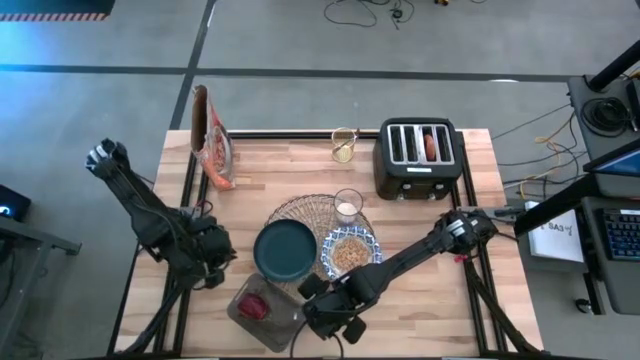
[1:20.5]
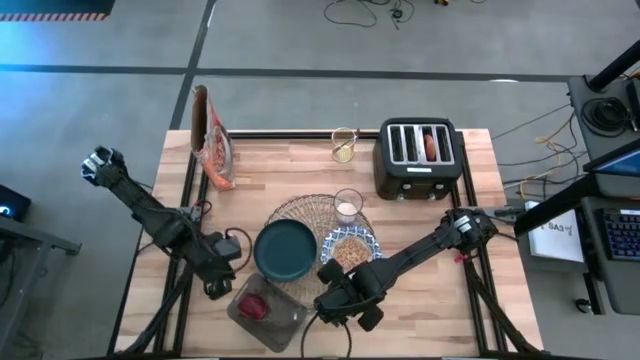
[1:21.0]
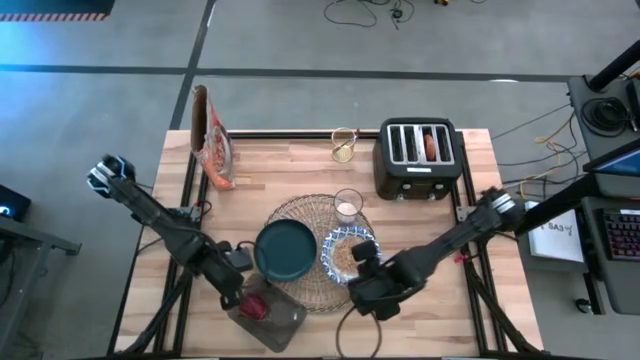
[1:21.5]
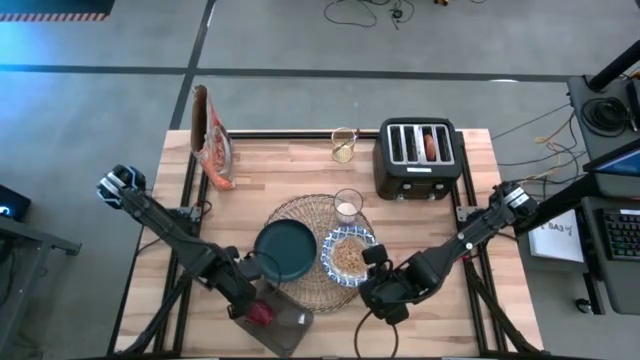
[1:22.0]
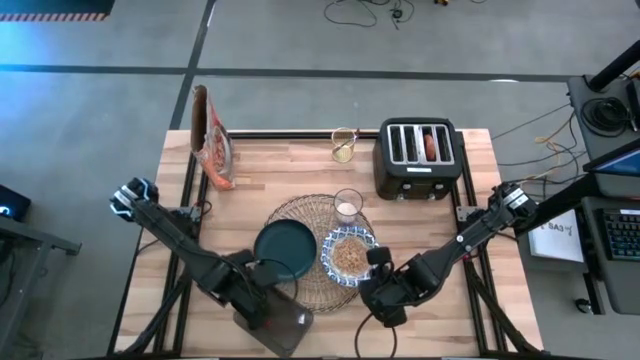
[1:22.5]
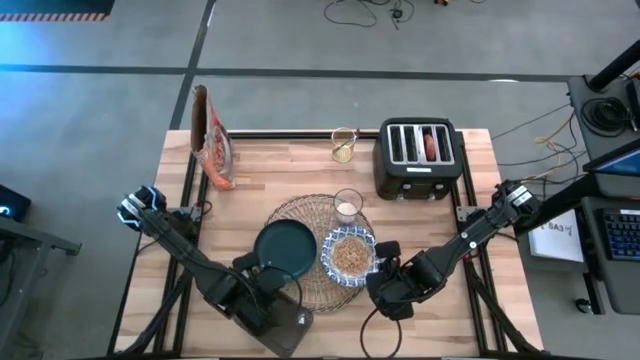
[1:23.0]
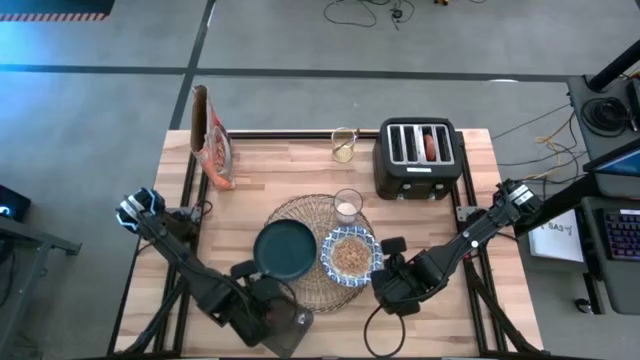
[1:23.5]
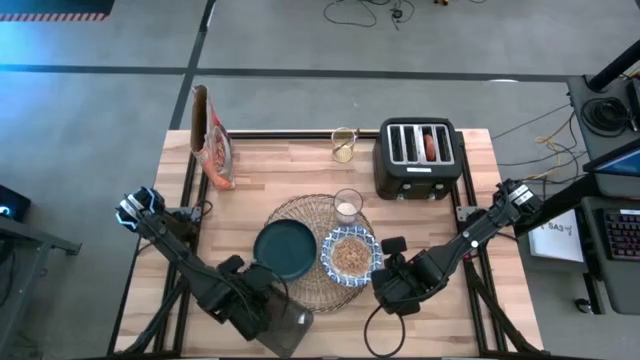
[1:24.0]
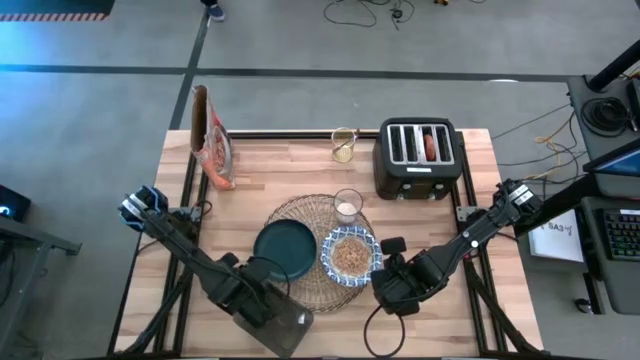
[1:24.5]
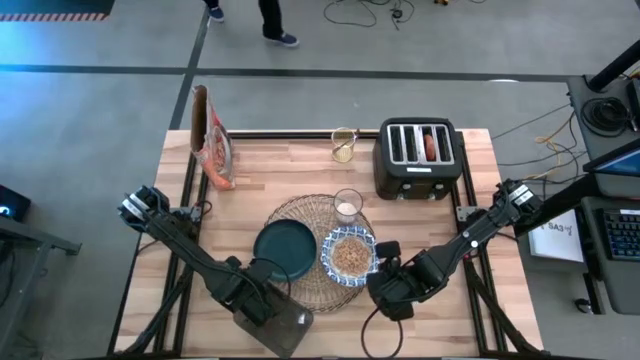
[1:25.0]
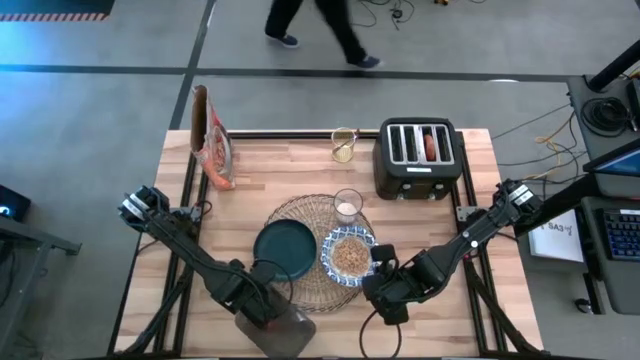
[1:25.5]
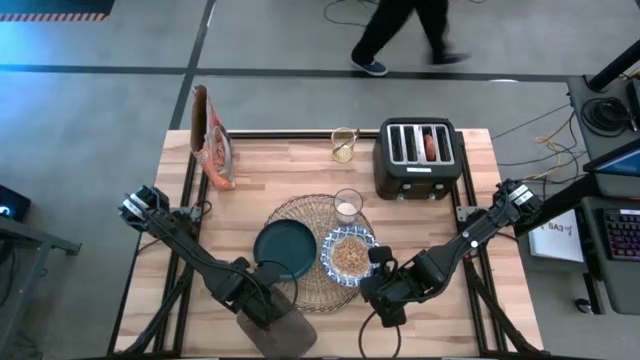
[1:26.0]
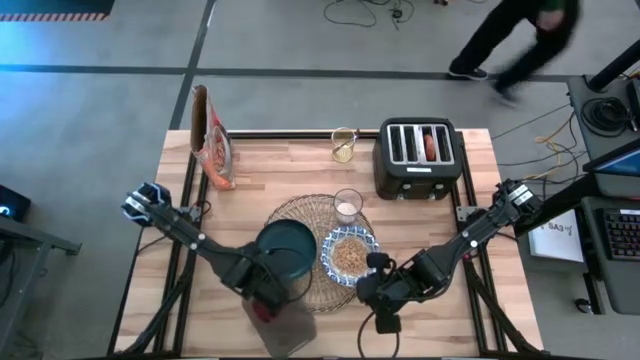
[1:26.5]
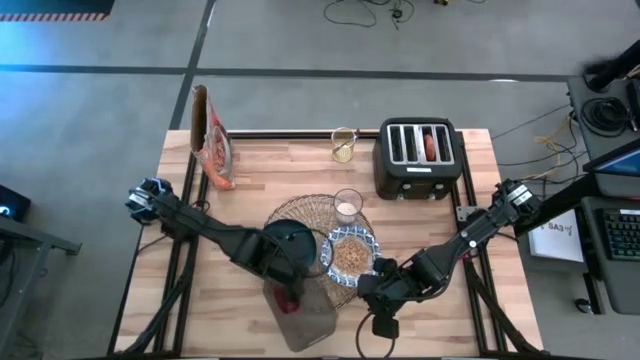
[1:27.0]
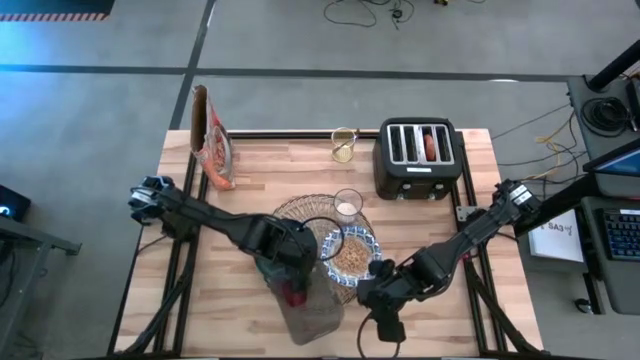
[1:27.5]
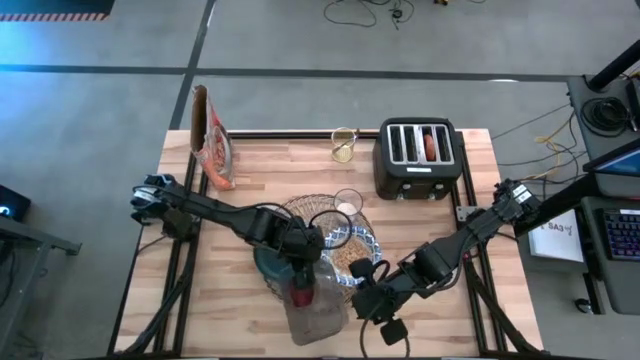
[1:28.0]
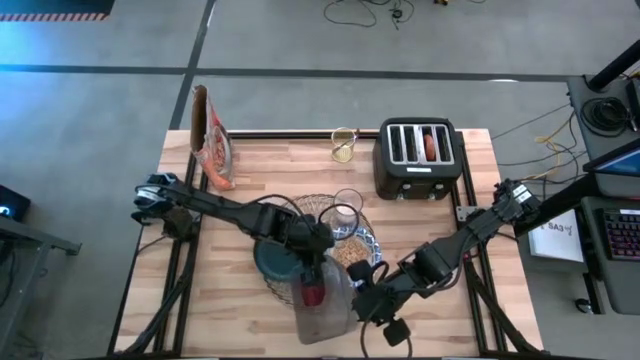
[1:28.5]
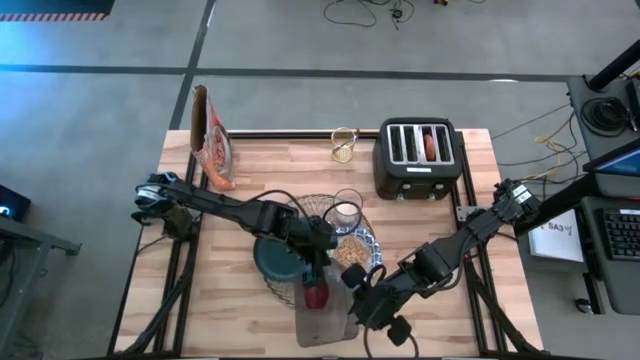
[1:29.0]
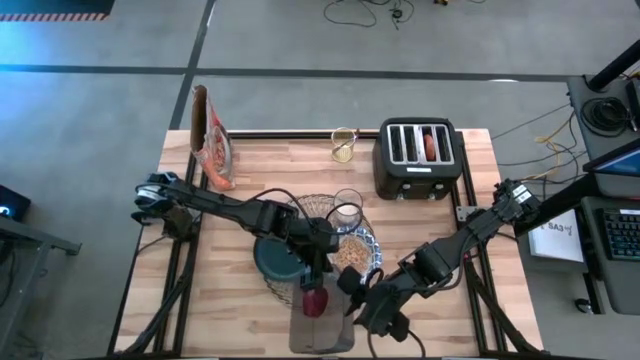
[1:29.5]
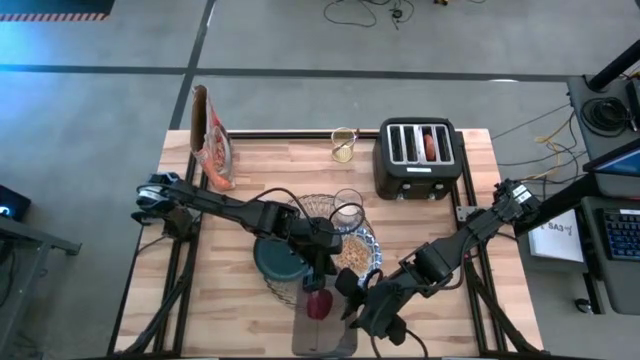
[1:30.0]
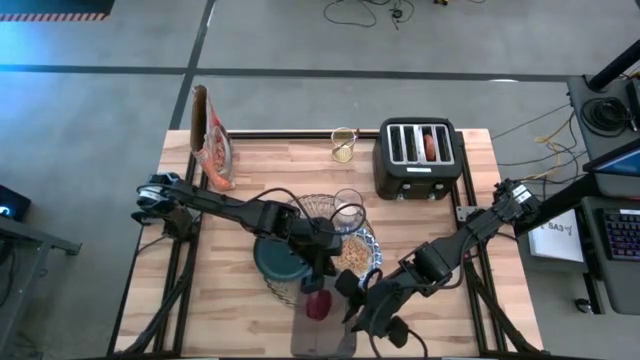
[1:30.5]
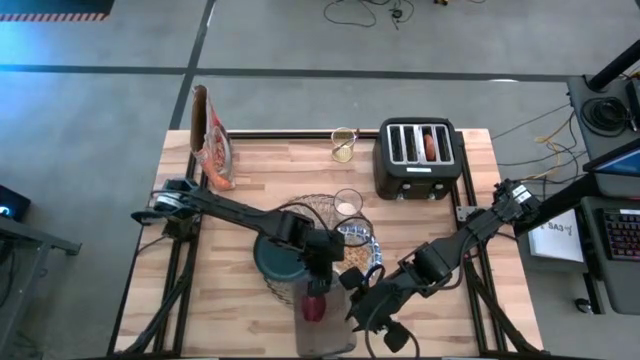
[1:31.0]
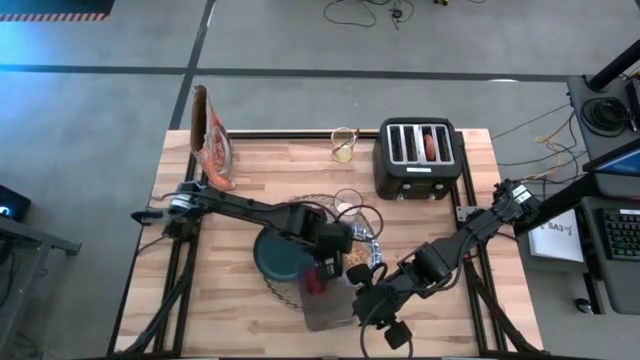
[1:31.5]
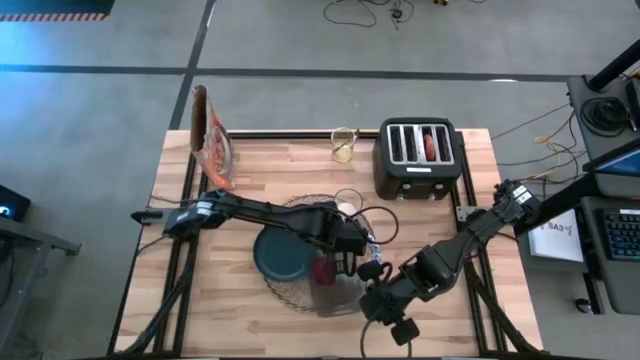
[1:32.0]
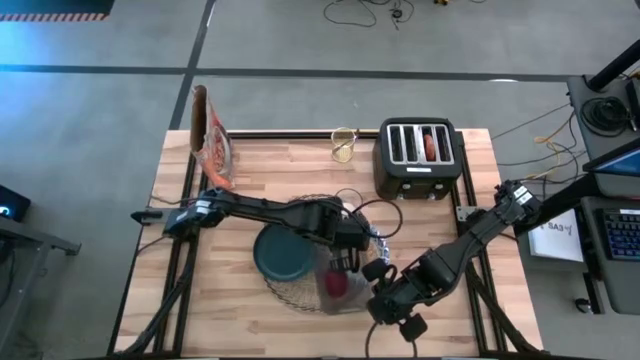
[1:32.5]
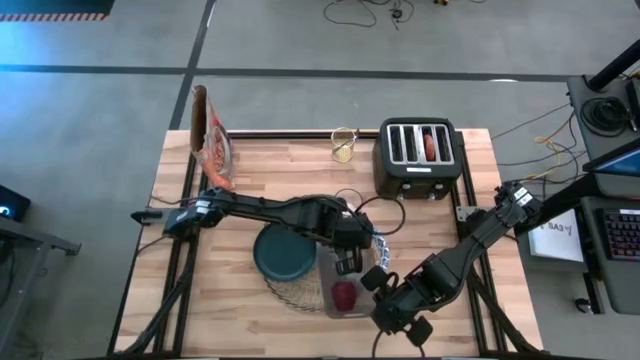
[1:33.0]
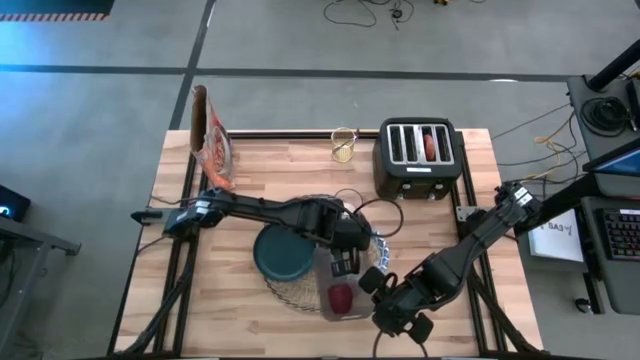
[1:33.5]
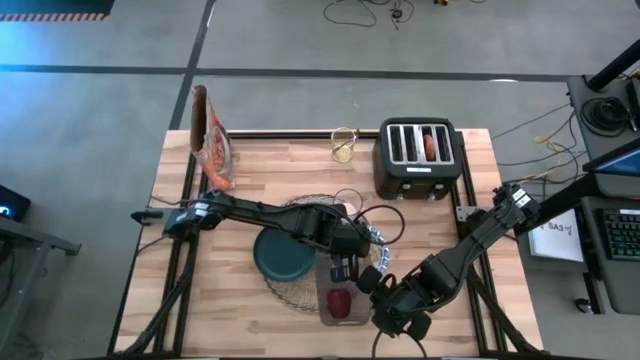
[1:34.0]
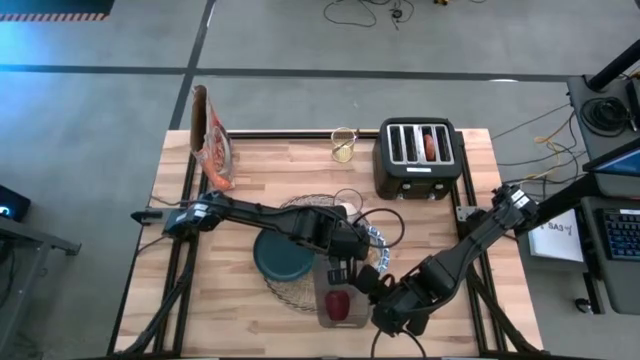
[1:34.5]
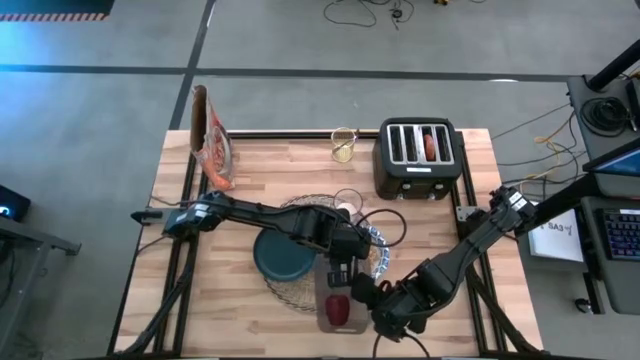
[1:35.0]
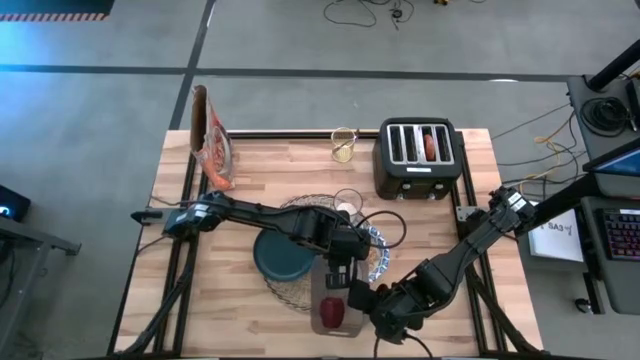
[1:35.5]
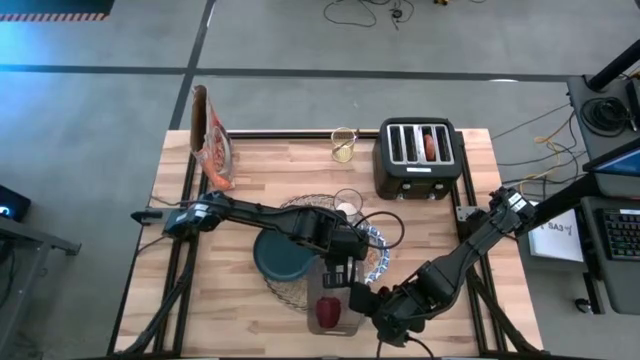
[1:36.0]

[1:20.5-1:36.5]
Task: Arrange a breakfast setting
Move the black bin to the bottom right of the table

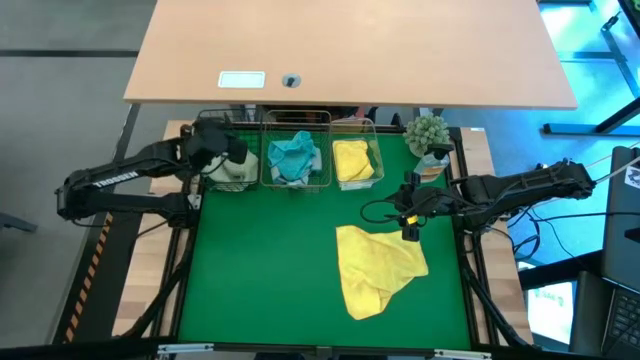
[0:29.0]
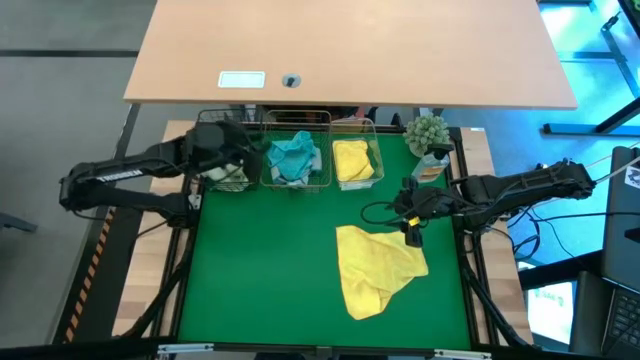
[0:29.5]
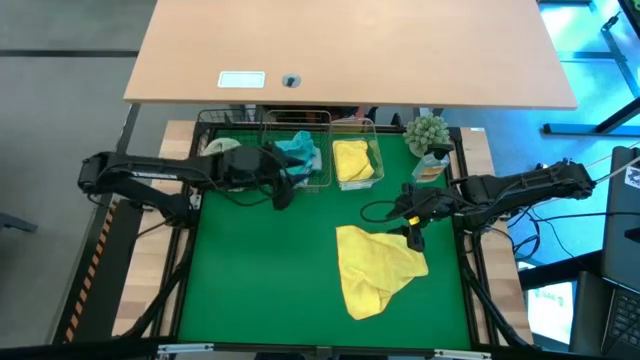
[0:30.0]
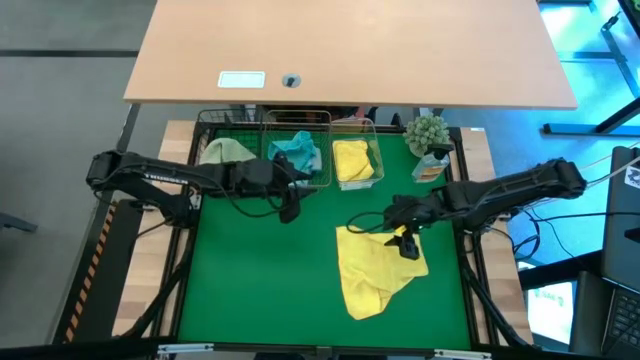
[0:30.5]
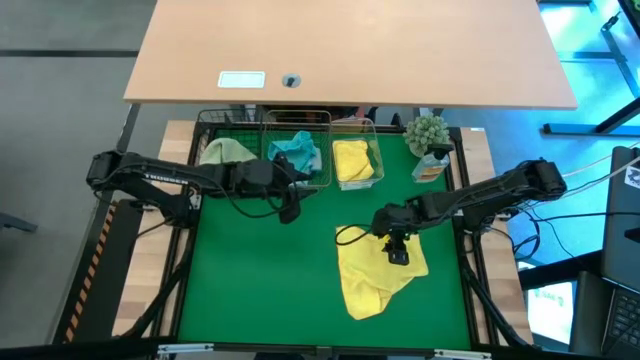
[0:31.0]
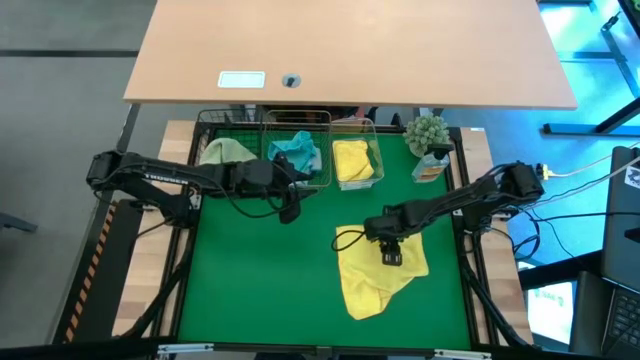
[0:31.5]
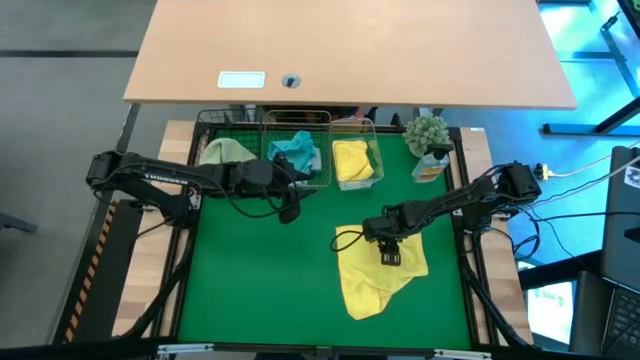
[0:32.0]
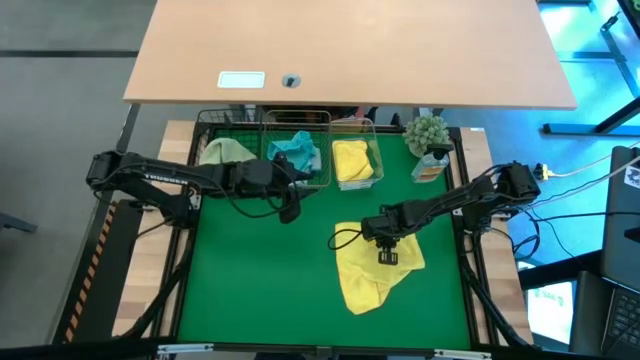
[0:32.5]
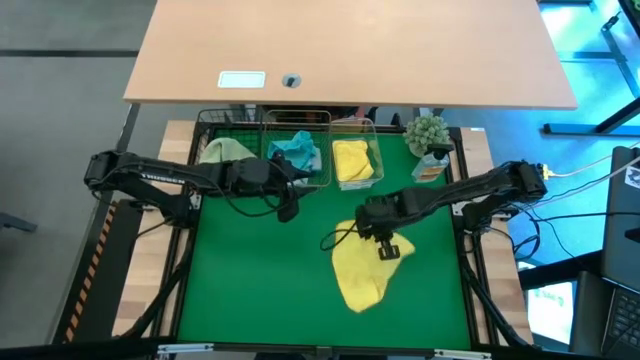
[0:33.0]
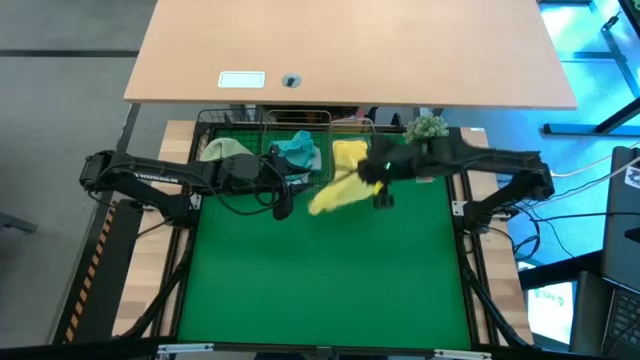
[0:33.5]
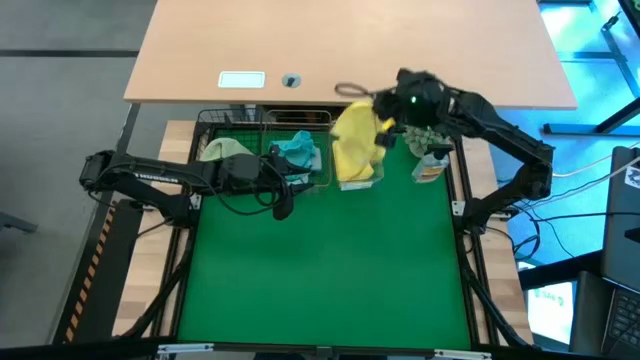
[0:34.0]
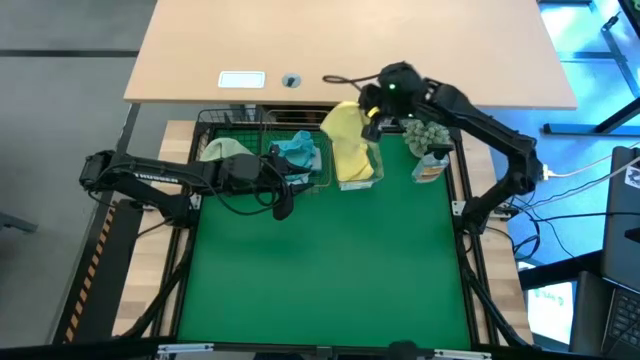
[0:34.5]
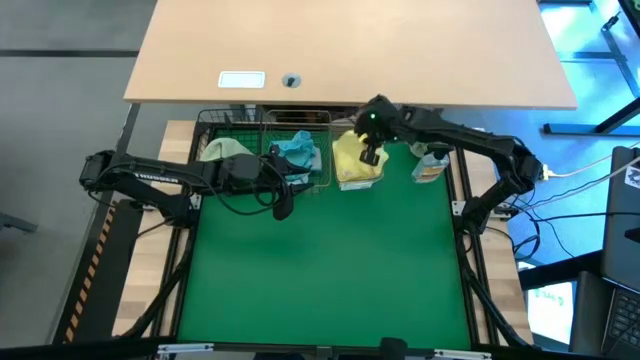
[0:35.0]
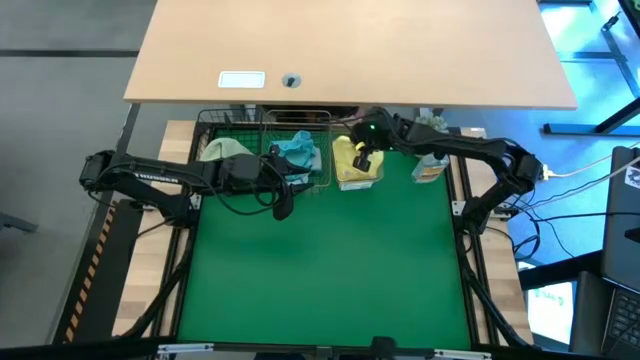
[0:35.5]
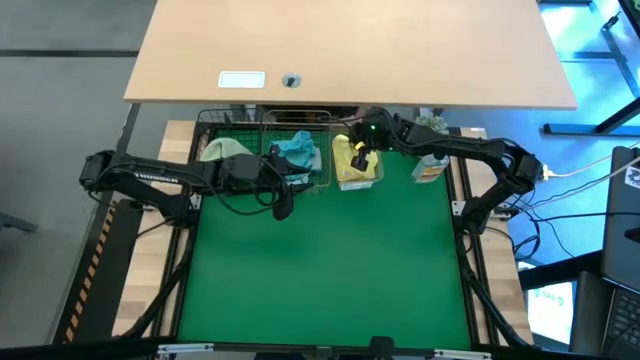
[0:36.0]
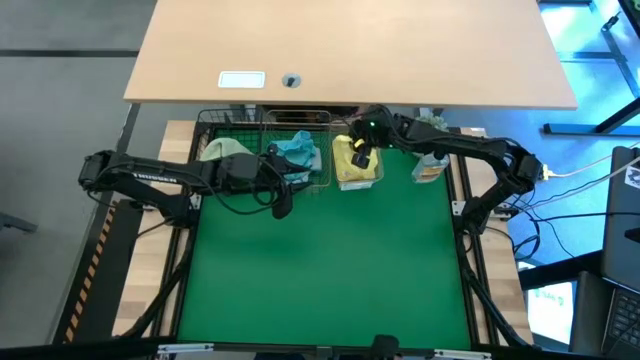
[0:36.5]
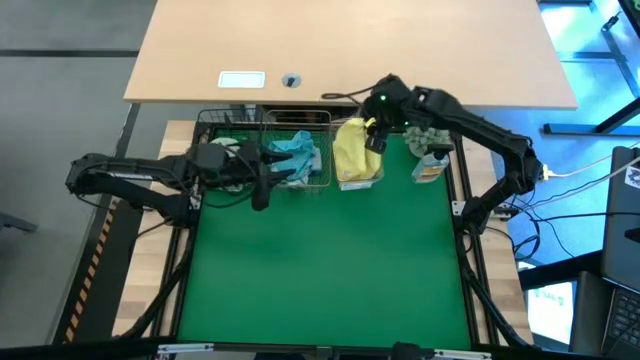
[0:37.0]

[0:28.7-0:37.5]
Task: Sort microfiber towel by color & place in baskets
Put the yellow microfiber towel into the transparent bin
